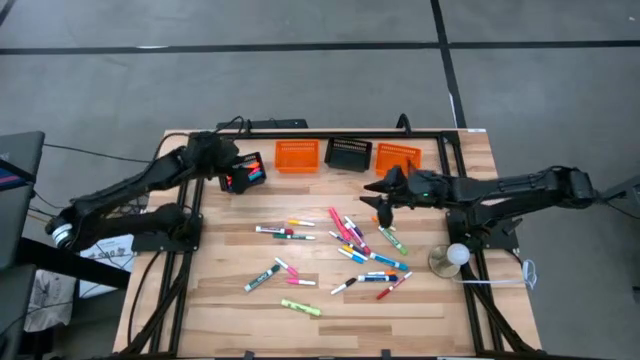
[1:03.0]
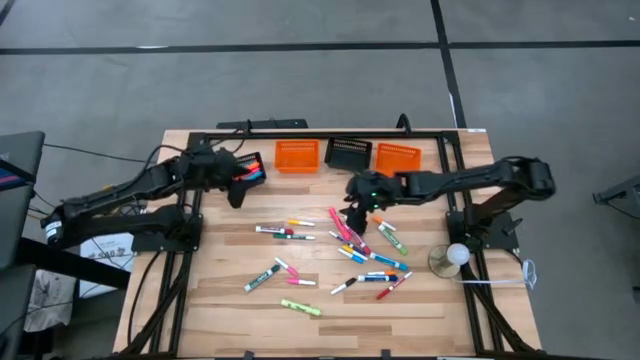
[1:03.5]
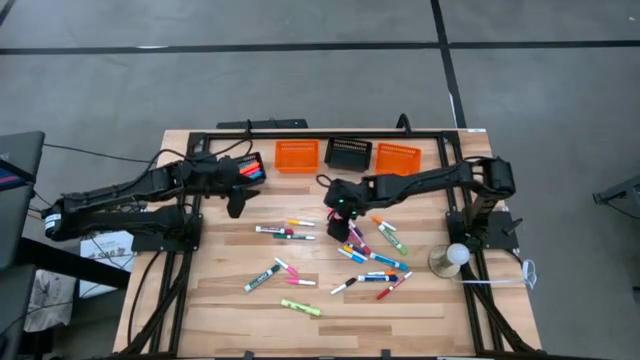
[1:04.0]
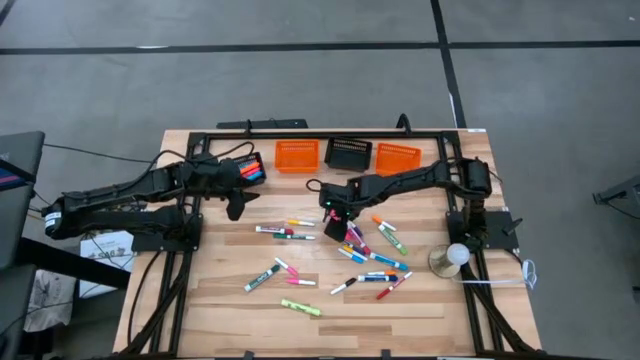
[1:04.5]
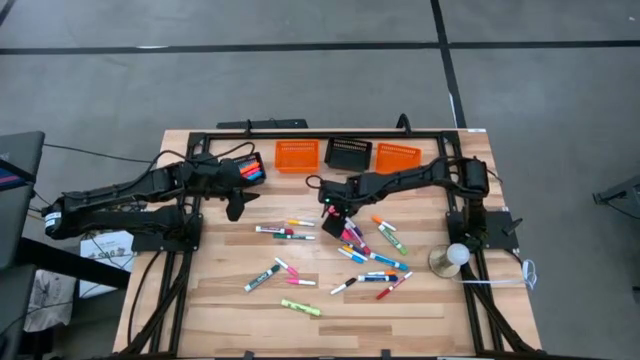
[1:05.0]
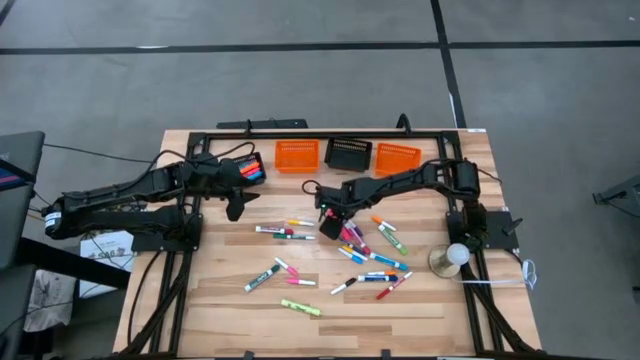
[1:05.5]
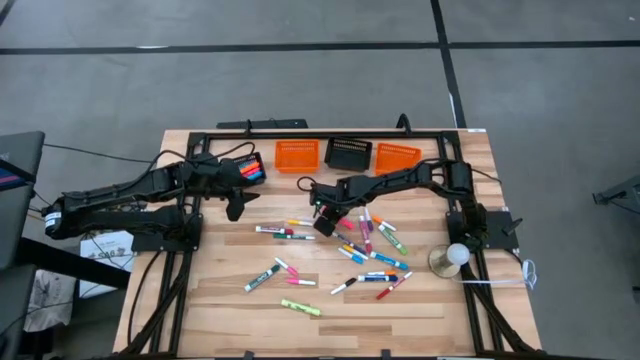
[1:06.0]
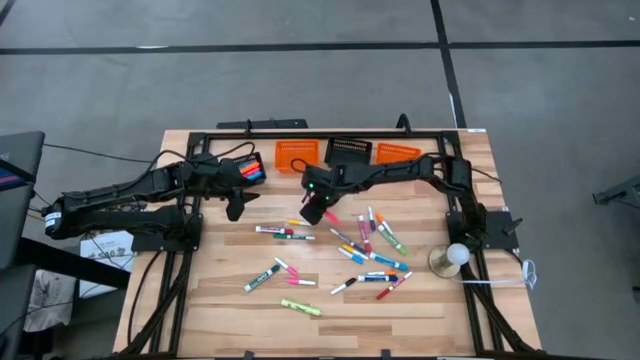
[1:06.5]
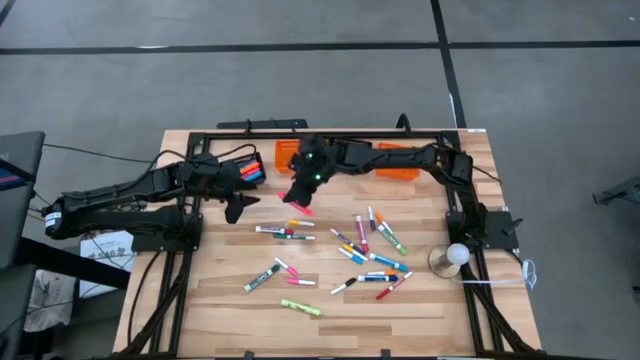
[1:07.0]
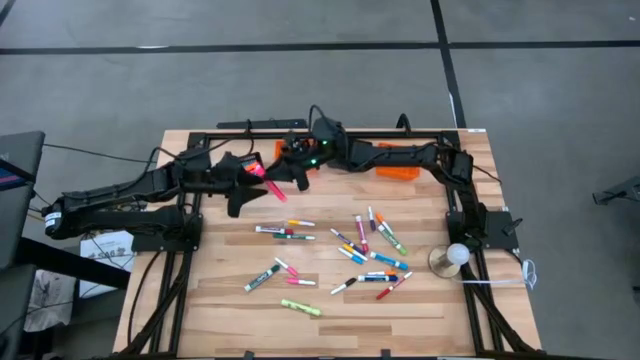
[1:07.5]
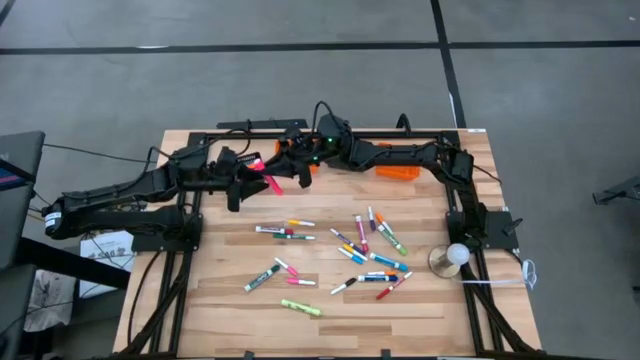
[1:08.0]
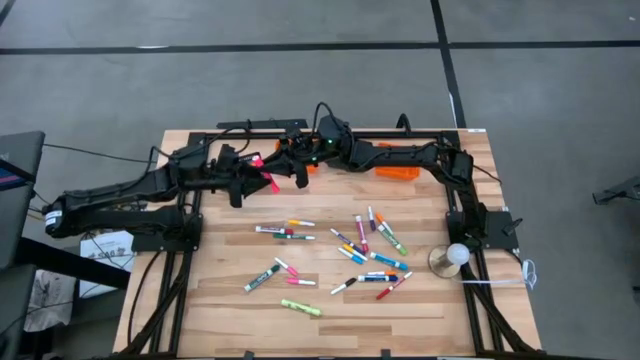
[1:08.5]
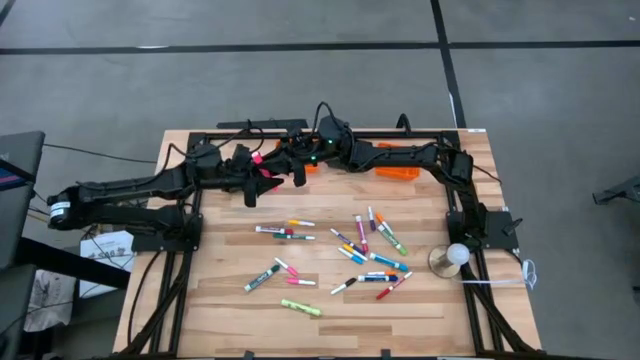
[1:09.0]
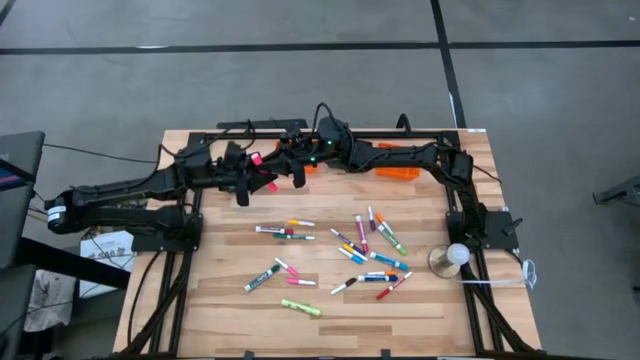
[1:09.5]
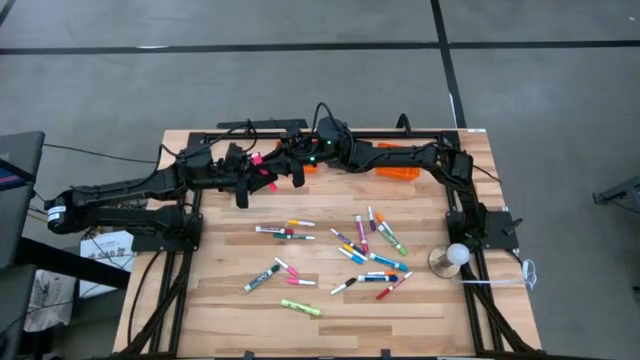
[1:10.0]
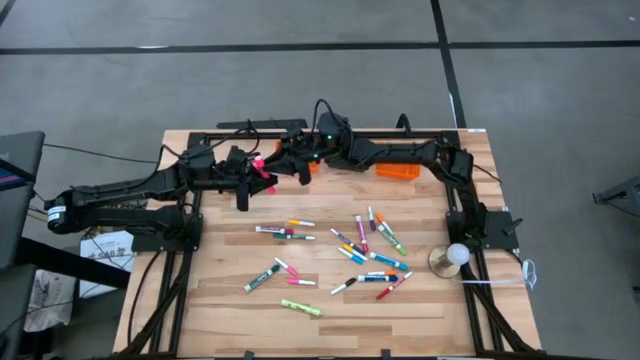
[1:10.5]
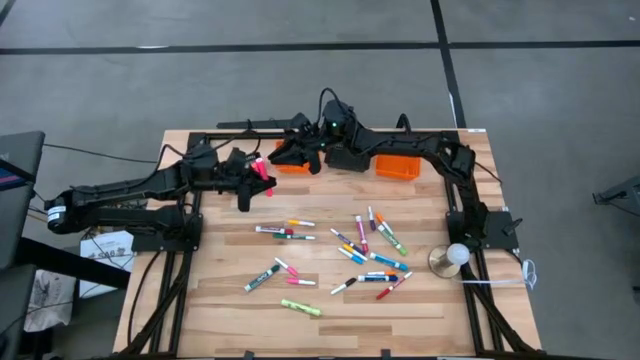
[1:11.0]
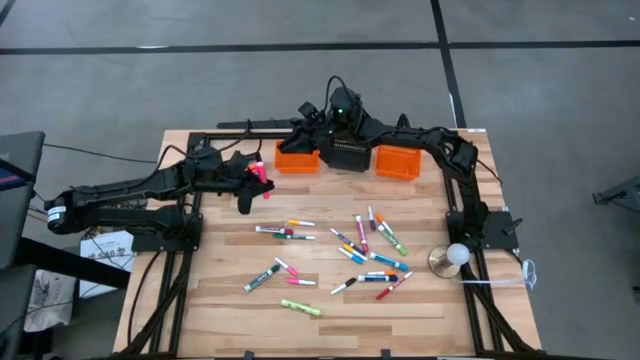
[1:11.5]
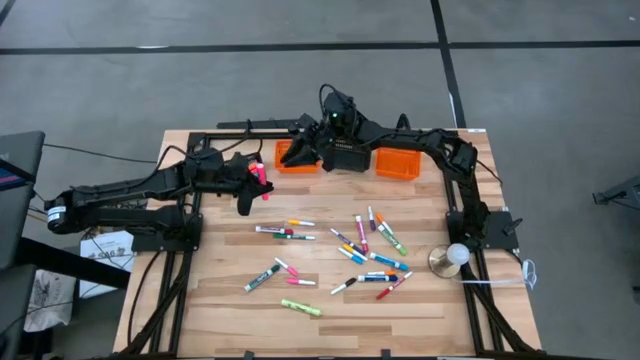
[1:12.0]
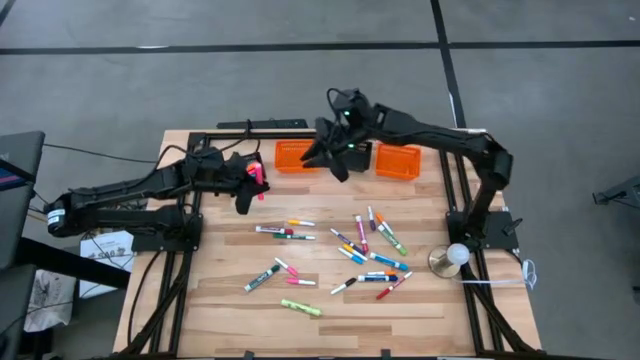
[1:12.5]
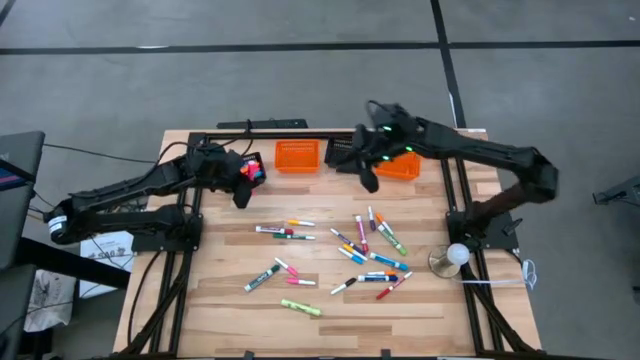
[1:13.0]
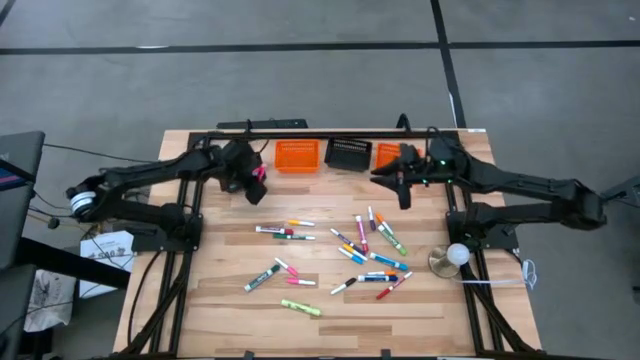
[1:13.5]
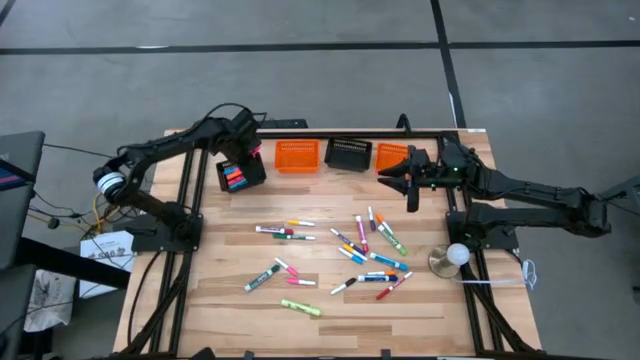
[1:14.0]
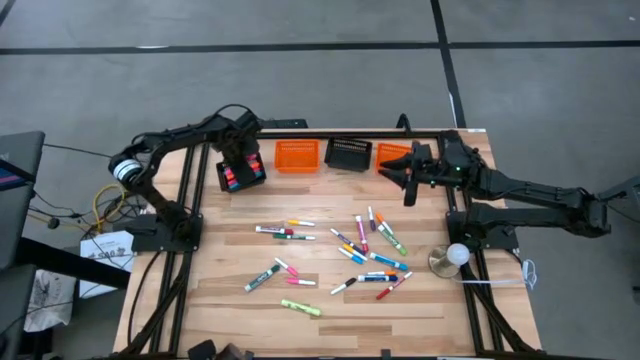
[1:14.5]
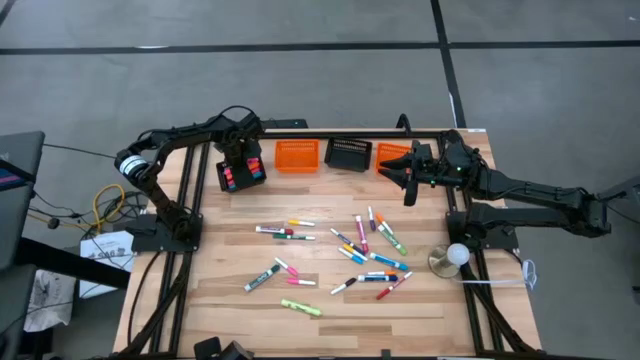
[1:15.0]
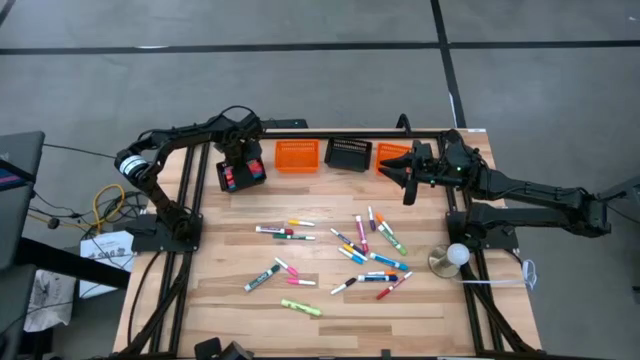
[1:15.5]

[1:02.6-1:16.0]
Task: Pick & Place Markers
Put the large pink highlighter pen into the left black bin

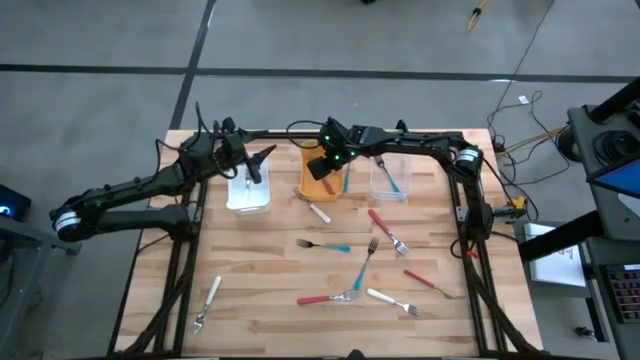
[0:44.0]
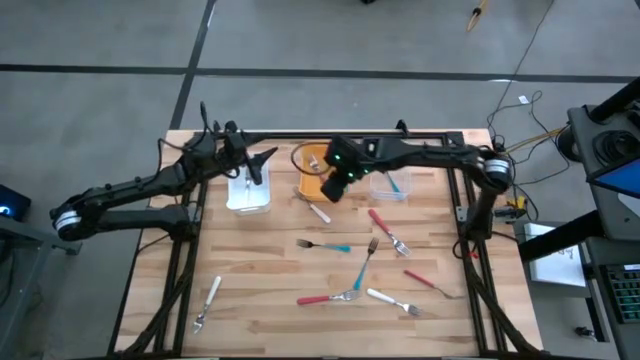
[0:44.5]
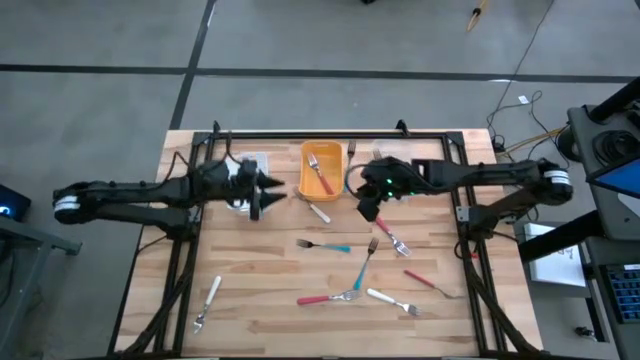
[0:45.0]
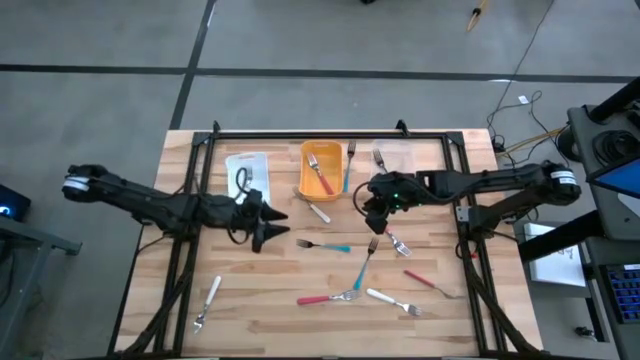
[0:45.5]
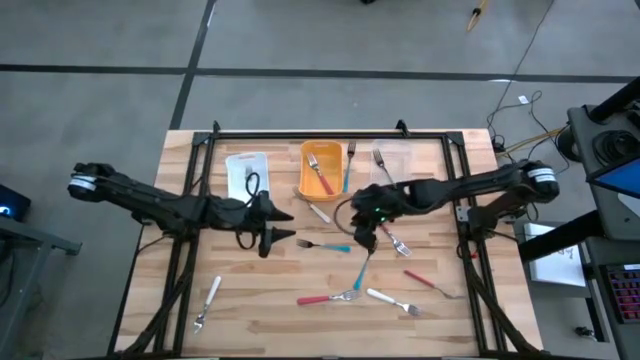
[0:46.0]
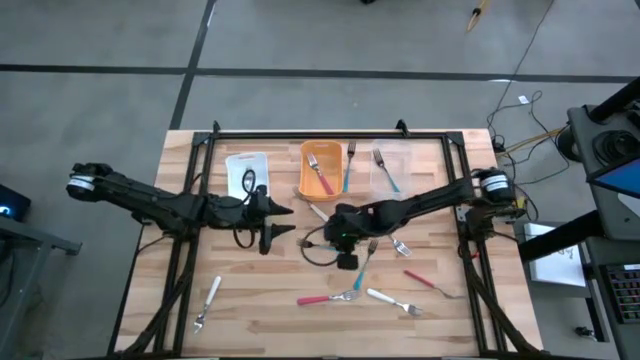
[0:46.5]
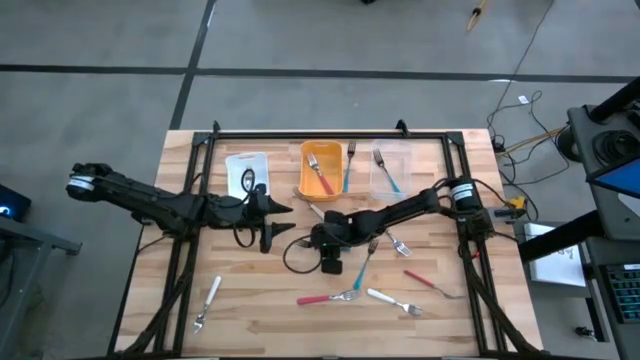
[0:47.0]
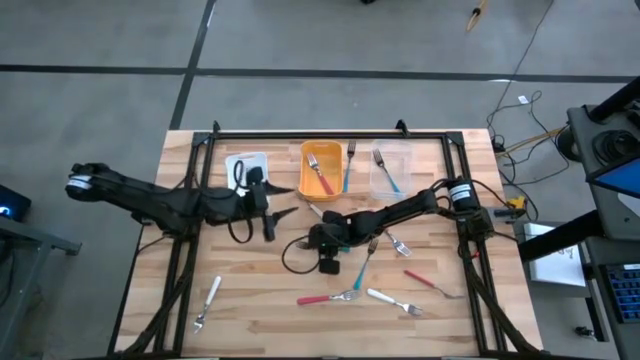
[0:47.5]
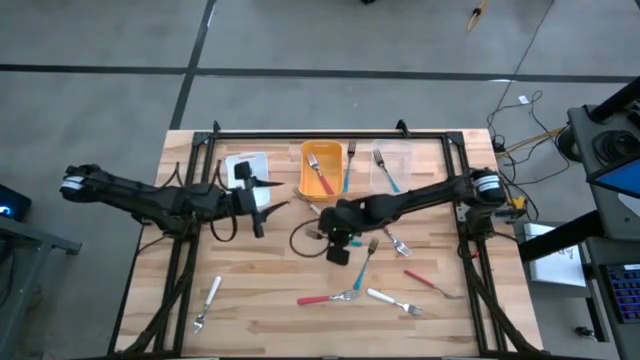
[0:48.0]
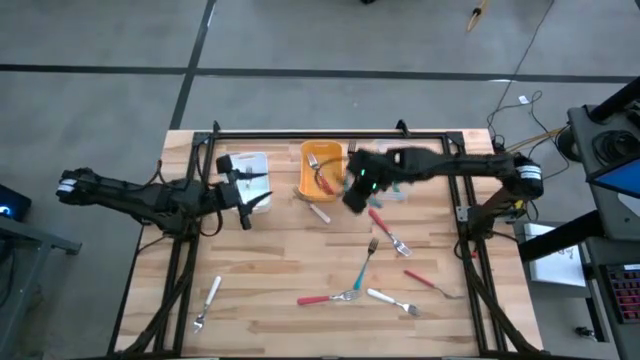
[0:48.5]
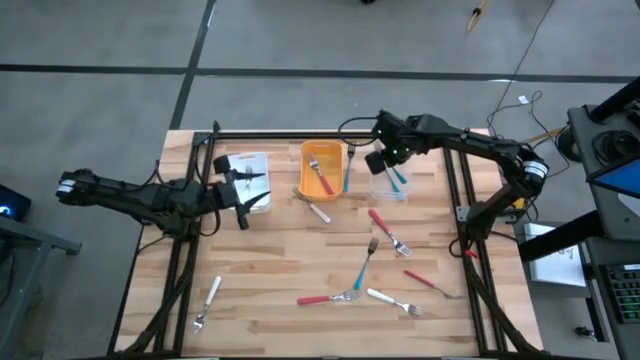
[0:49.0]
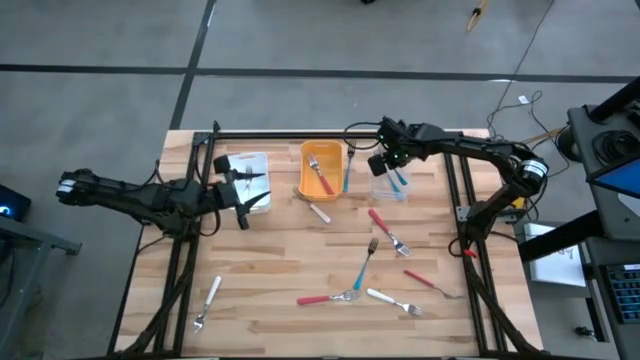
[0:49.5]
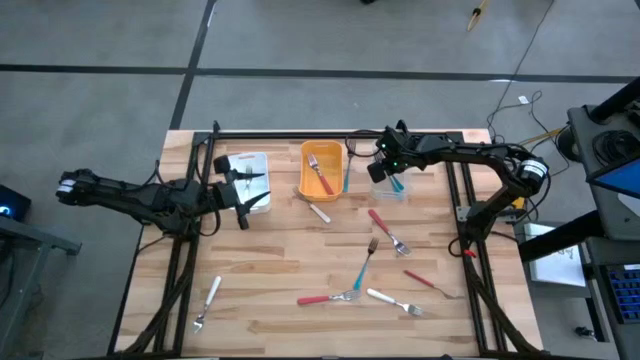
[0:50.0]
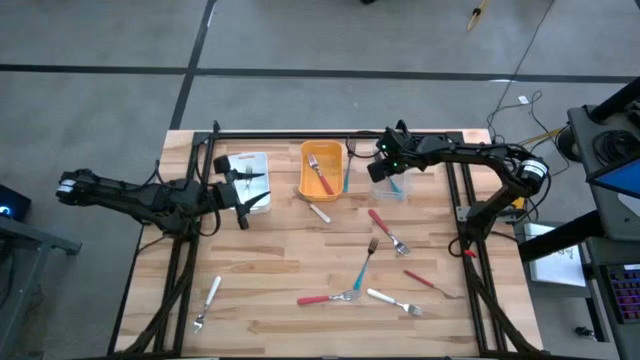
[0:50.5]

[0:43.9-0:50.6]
Task: Sort silverware by color (type)
Put the blue fork into the transparent bin

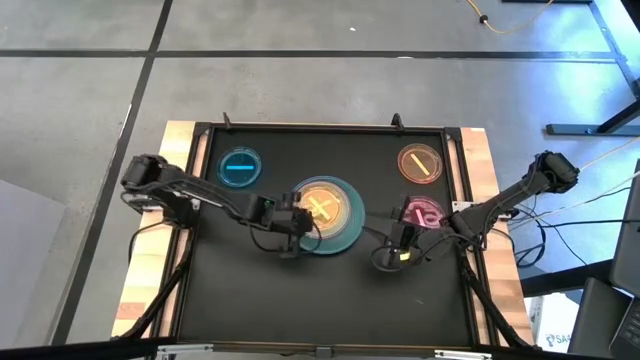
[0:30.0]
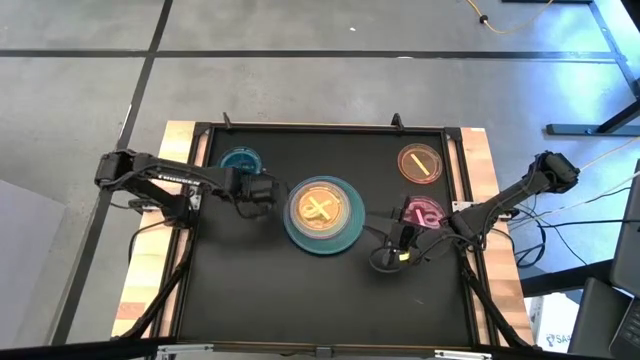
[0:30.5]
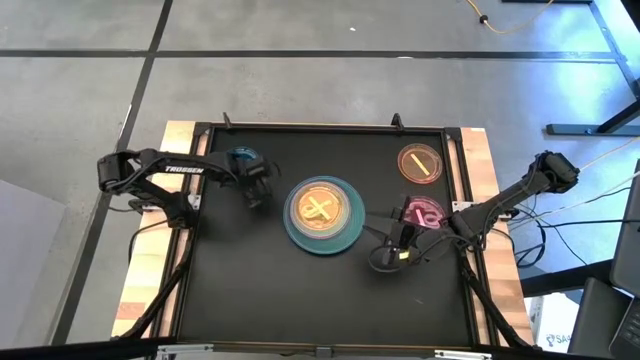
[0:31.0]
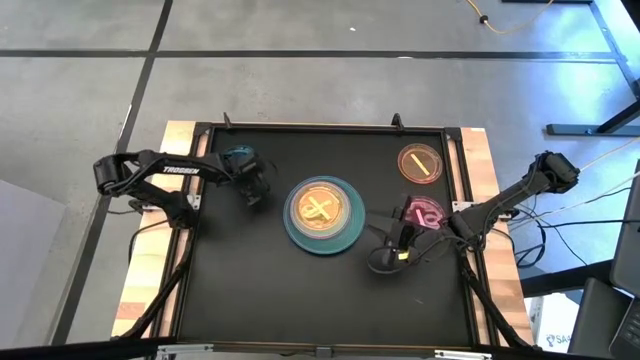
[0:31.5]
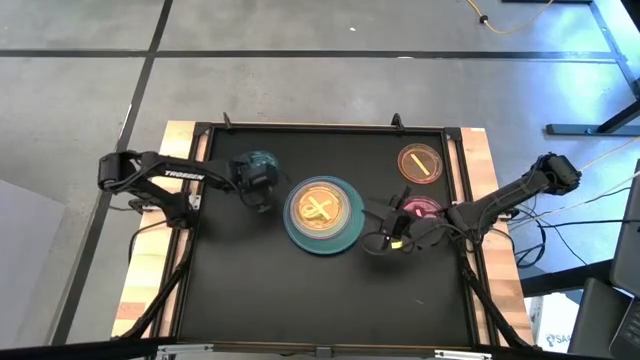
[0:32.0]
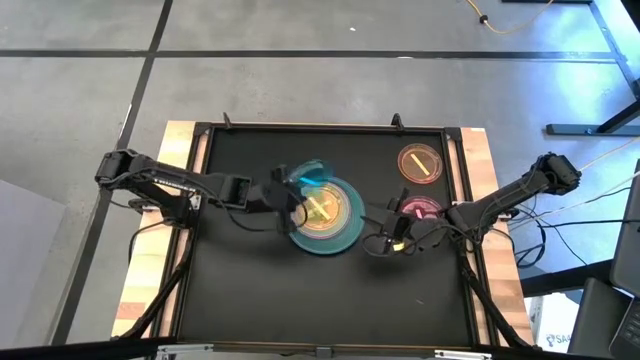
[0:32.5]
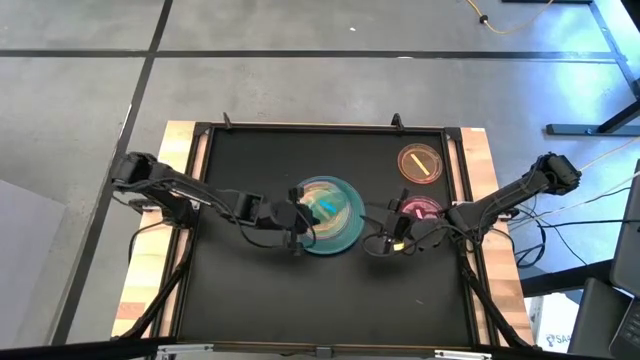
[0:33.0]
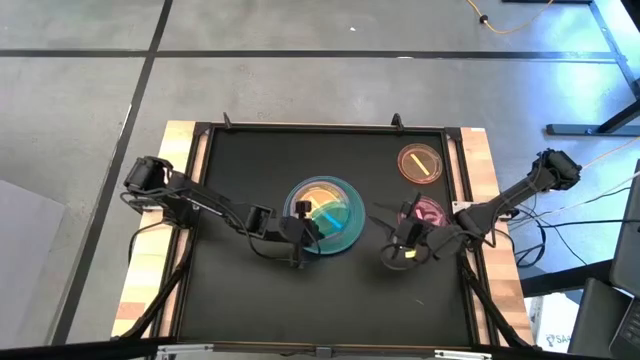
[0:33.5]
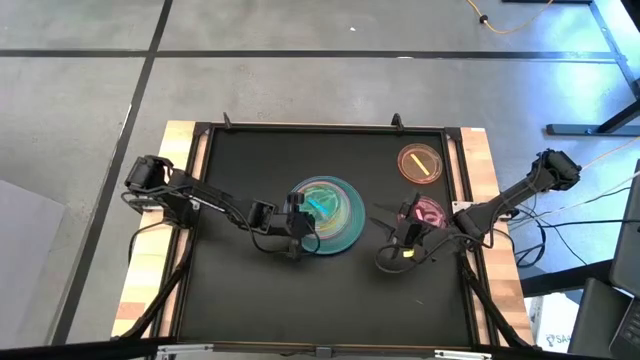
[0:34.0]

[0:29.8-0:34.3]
Task: Stack plastic plates
Stack the transparent blue plate on top of the transparent orange plate
